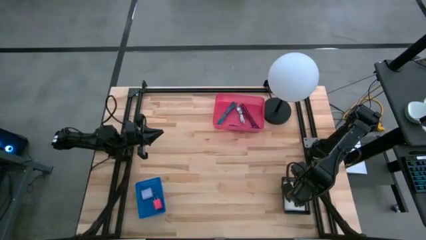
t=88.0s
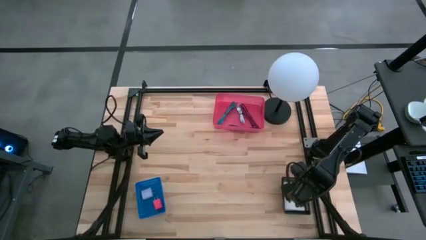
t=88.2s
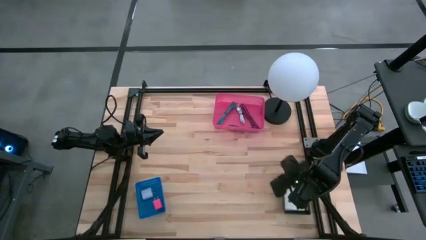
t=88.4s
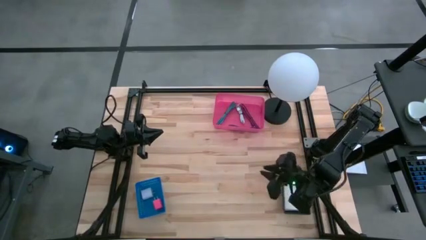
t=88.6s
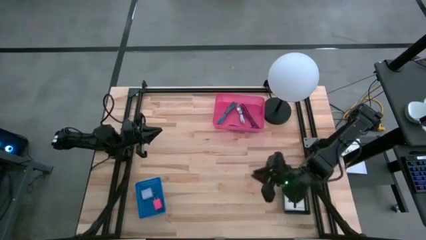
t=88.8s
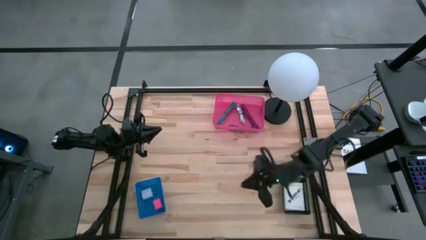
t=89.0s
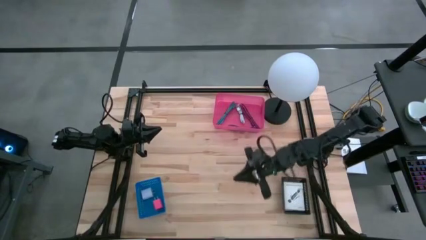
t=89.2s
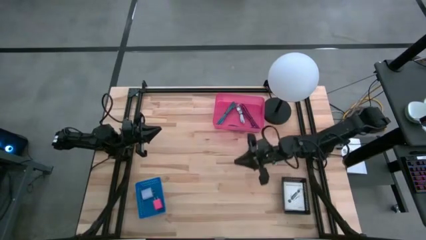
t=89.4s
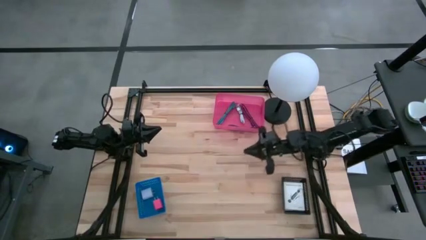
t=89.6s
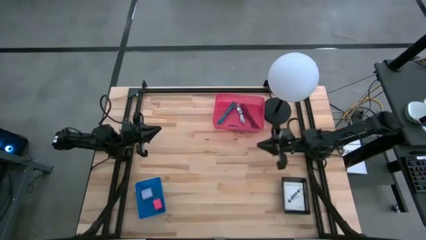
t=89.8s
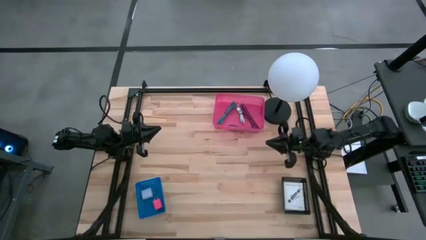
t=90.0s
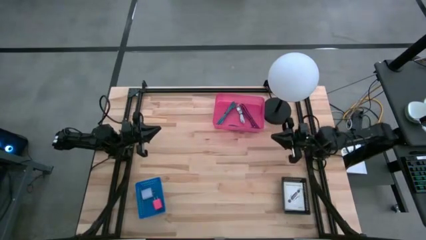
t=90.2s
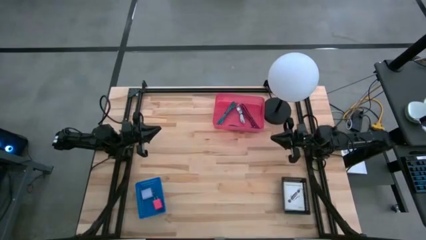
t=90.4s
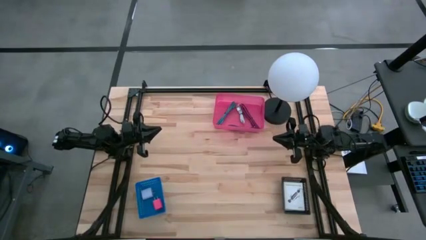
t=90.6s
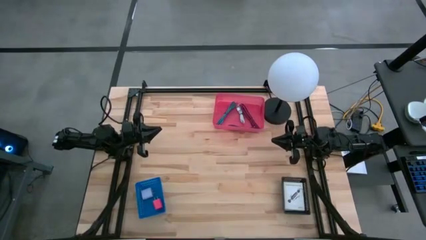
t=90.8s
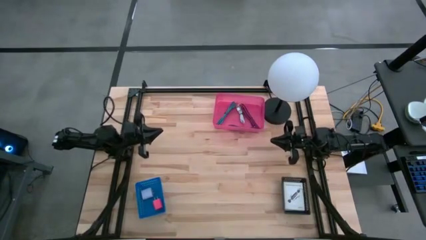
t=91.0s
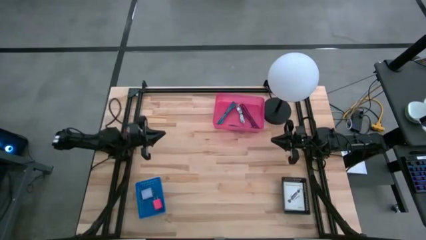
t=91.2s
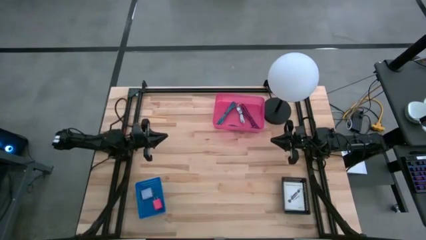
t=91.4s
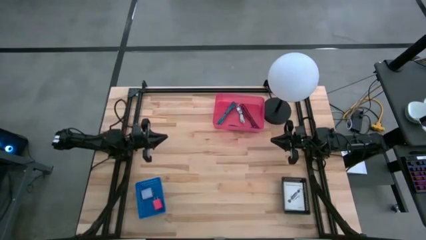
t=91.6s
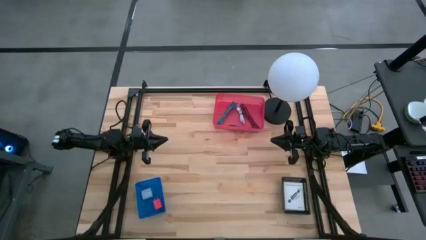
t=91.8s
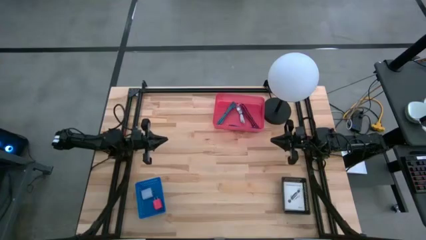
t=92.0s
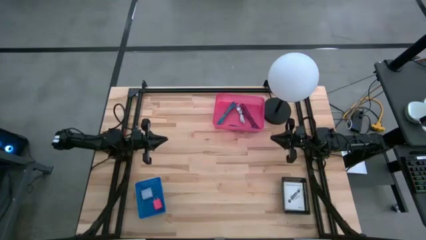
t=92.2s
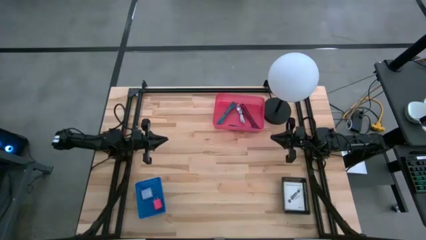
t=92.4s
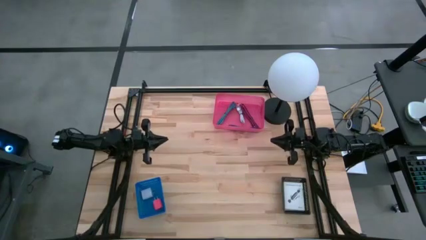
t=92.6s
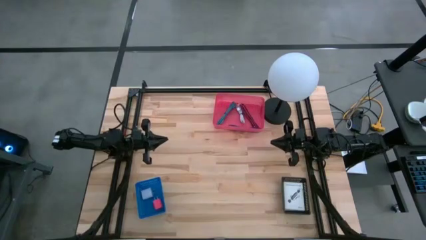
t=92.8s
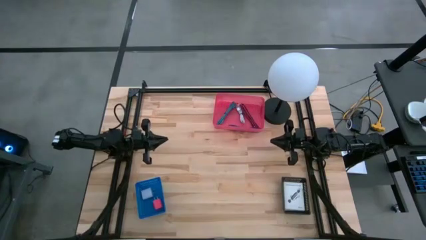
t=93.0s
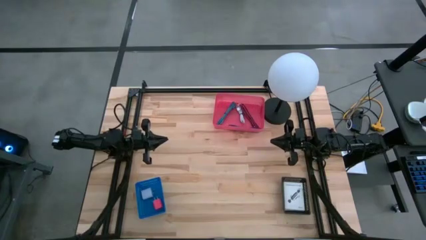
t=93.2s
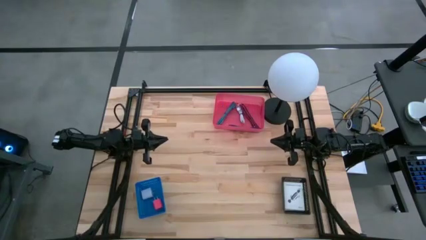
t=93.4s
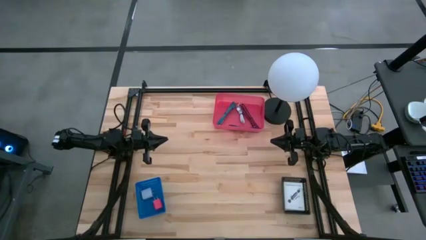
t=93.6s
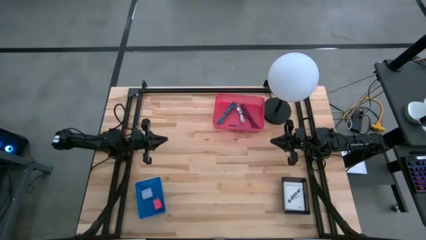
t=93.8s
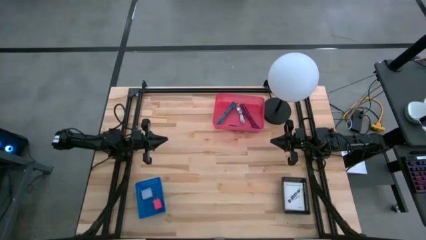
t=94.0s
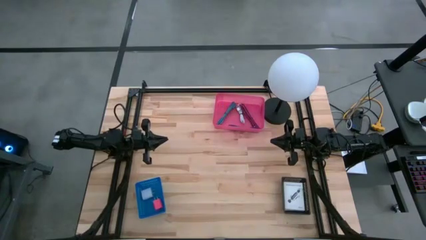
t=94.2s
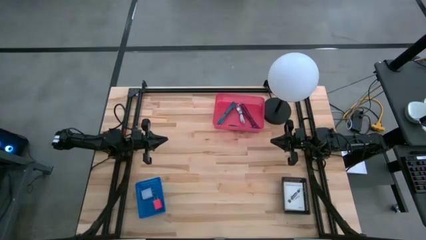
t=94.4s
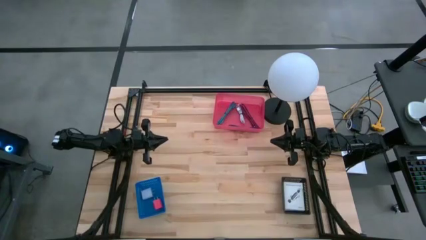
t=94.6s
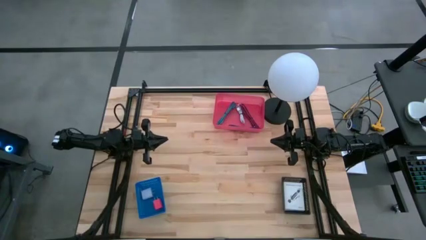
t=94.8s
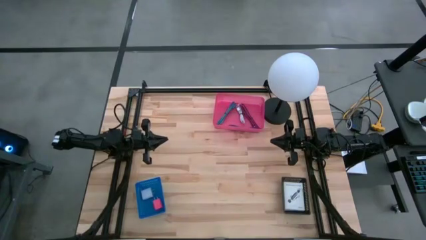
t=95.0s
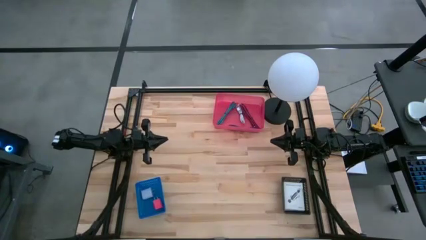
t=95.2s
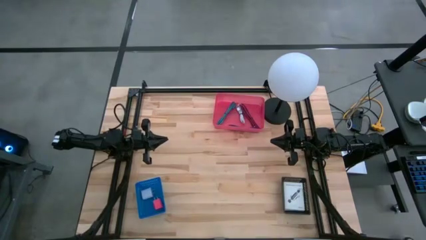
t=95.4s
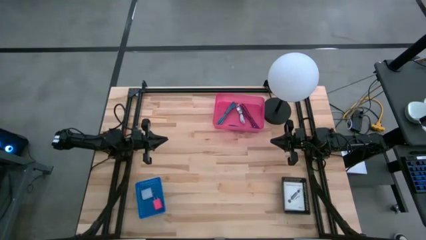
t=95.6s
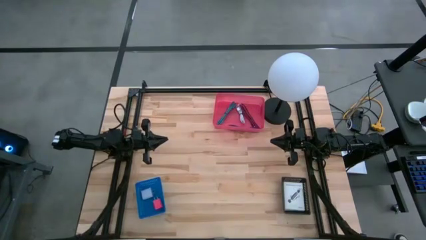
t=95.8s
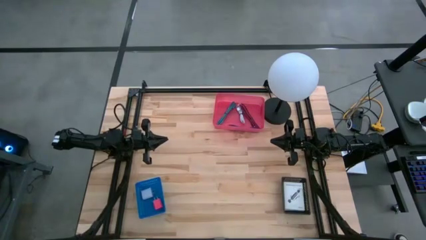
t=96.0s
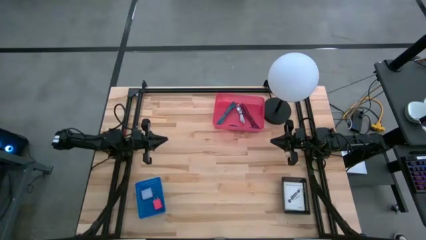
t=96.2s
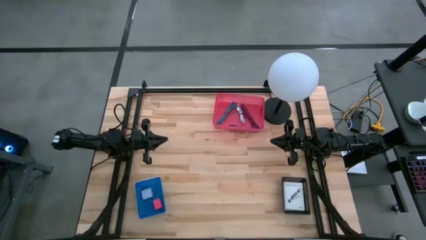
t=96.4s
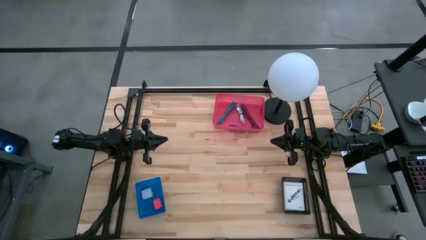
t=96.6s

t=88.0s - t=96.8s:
Task: Pick and place items into bin
Return to Home Position

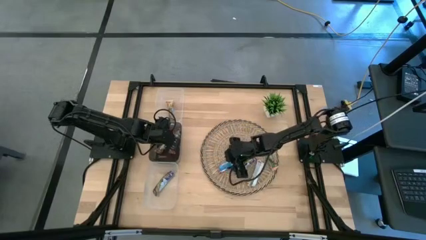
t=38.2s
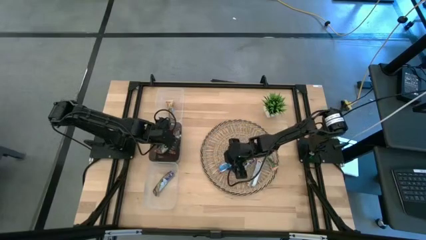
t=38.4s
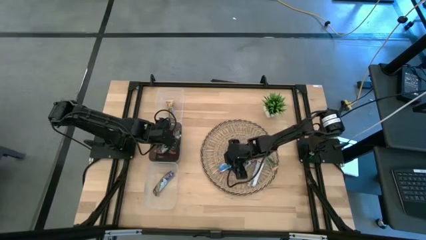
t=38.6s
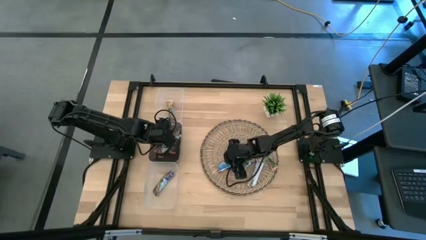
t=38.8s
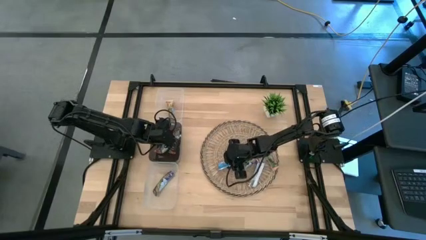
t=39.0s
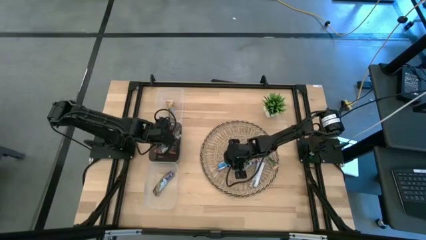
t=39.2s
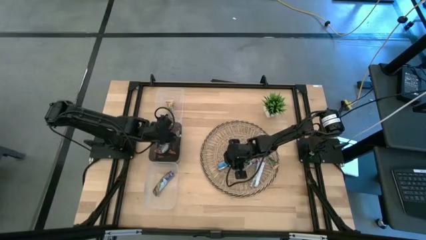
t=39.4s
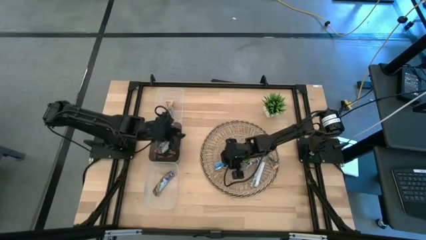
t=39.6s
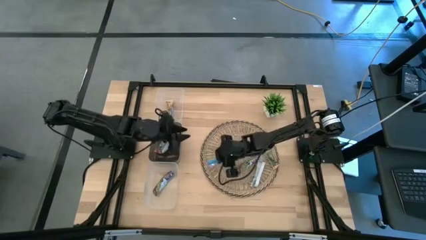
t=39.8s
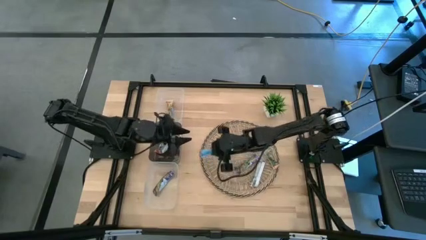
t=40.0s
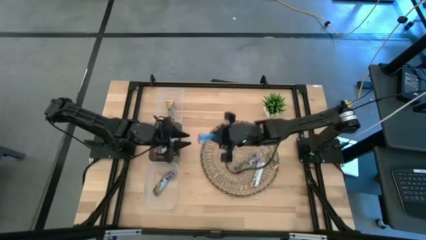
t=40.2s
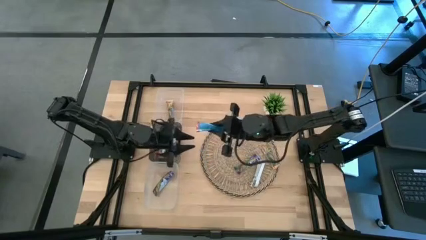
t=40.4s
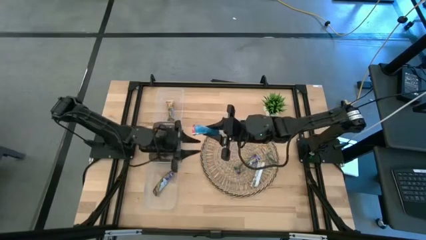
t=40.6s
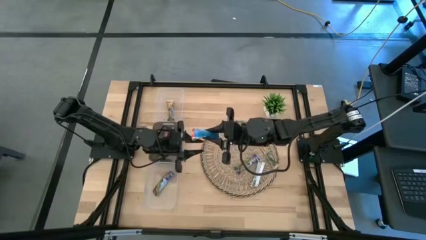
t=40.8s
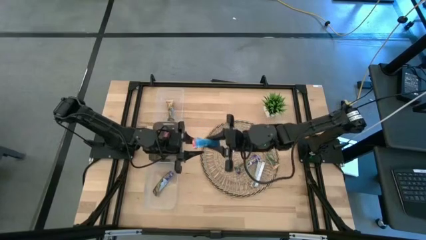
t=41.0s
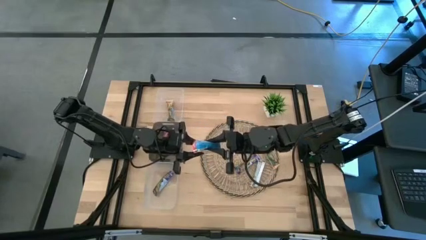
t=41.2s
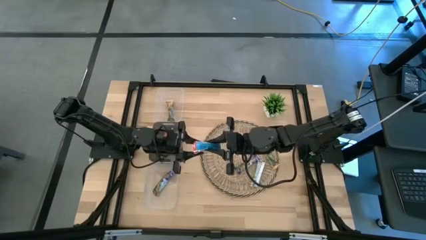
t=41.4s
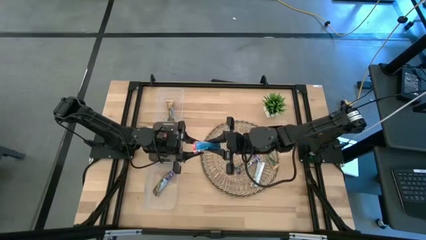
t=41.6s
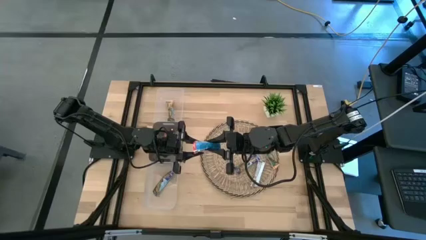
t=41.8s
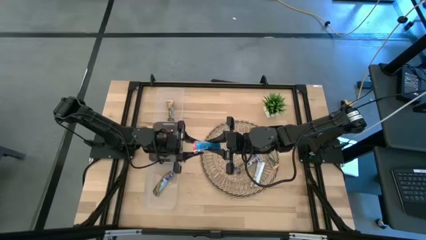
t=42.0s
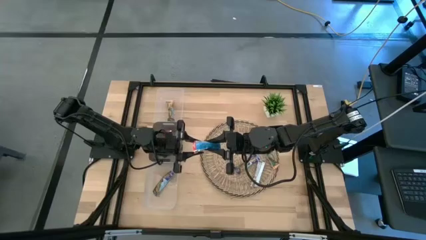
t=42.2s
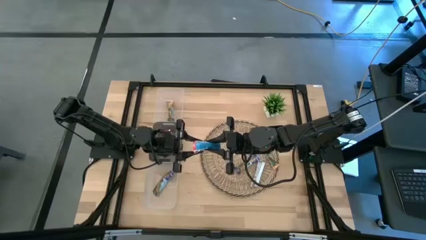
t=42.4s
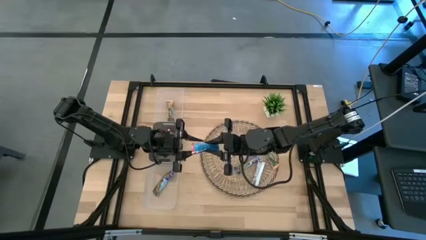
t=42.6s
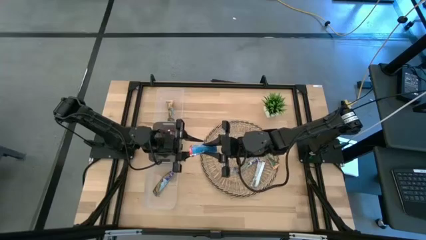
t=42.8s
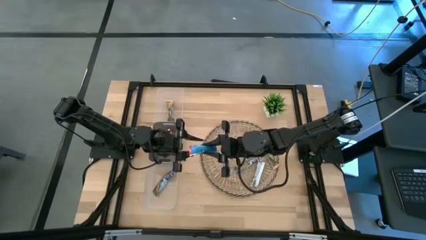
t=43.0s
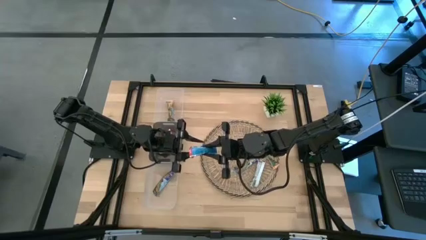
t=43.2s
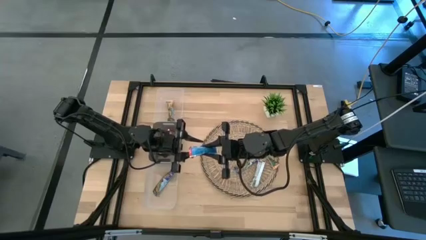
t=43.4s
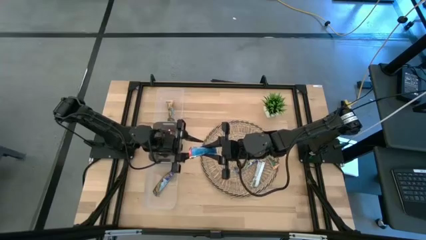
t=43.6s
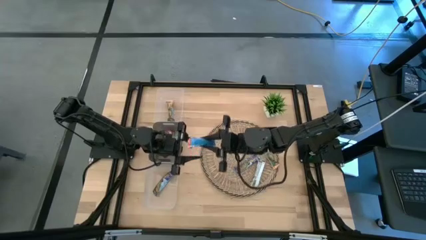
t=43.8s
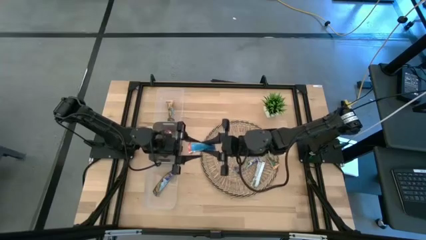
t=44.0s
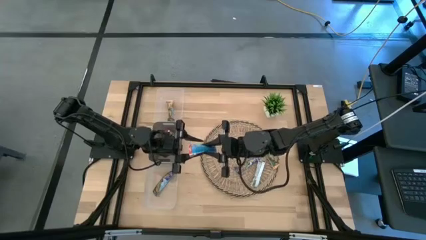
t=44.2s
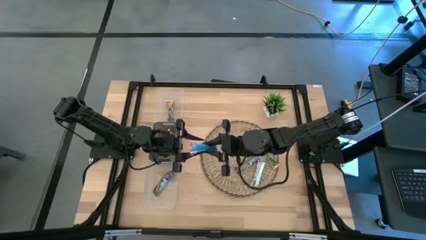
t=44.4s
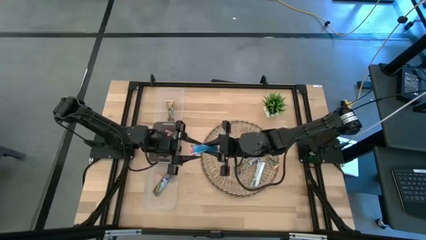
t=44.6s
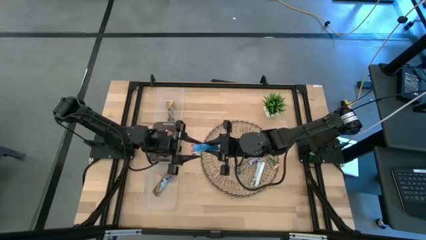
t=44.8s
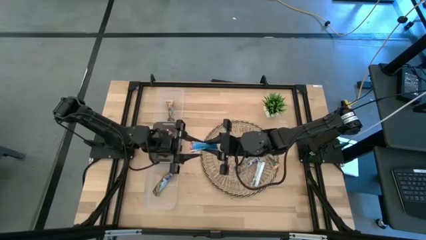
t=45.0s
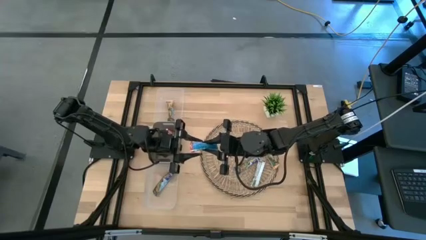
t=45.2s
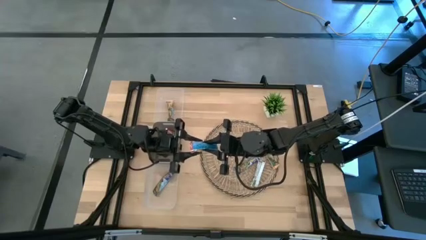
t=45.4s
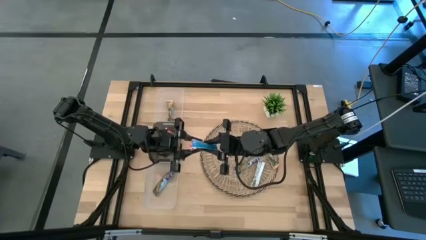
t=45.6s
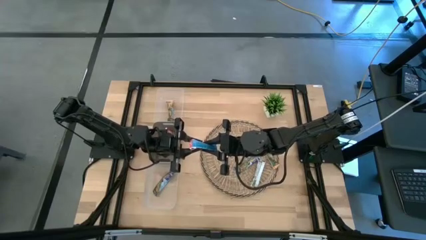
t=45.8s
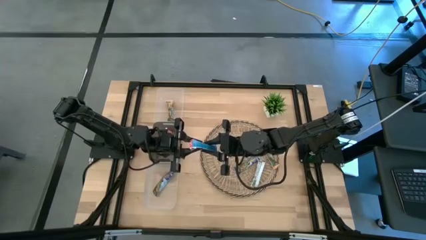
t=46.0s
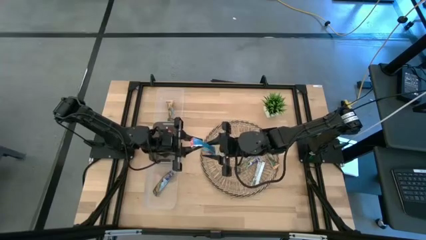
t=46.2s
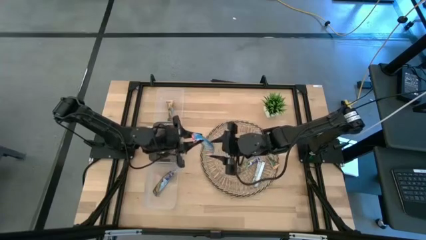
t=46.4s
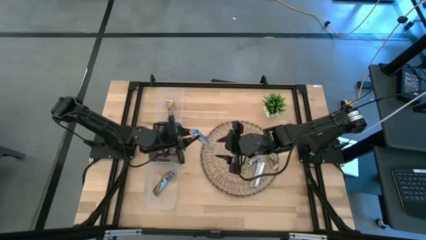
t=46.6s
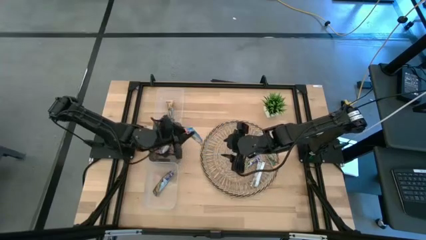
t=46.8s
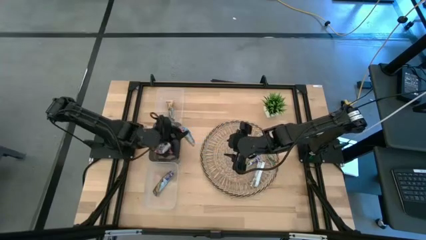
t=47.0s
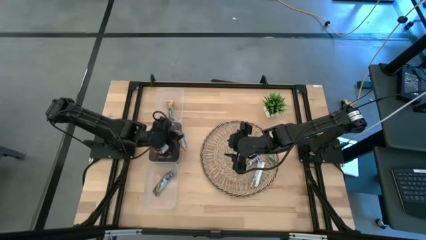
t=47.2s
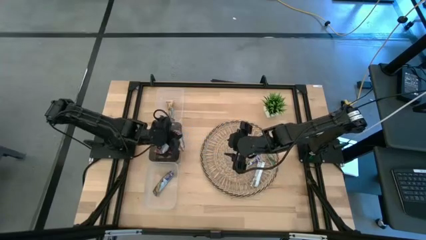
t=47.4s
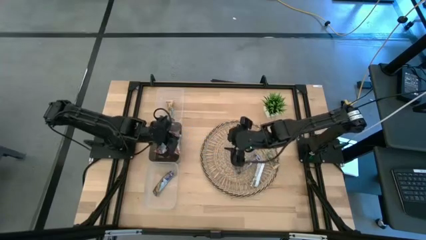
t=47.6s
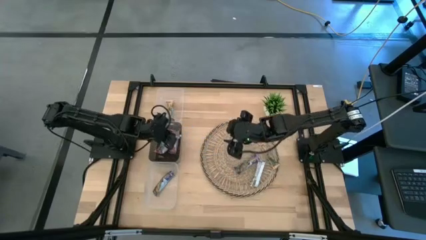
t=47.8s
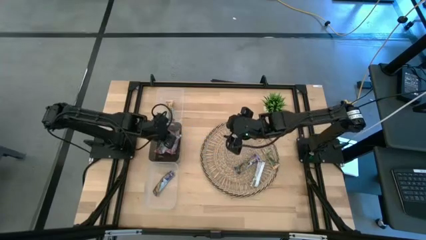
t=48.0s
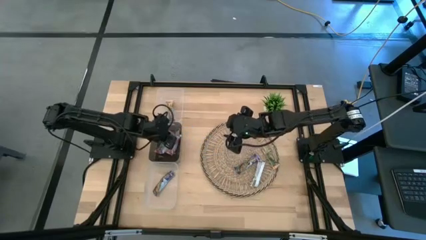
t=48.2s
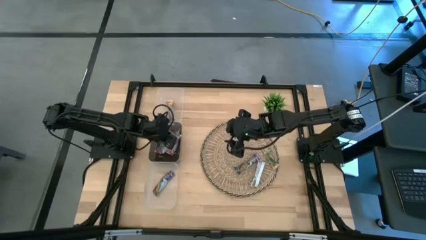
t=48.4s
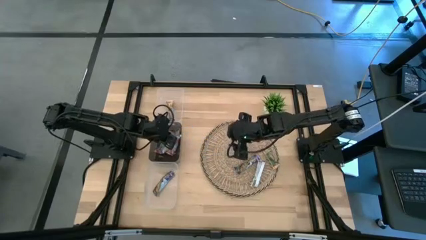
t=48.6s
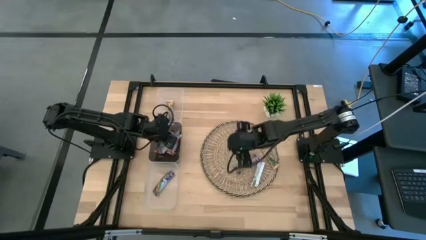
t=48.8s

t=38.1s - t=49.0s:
Task: Pick and place Granola Bars by type
Put the red granola bar into the black bin
